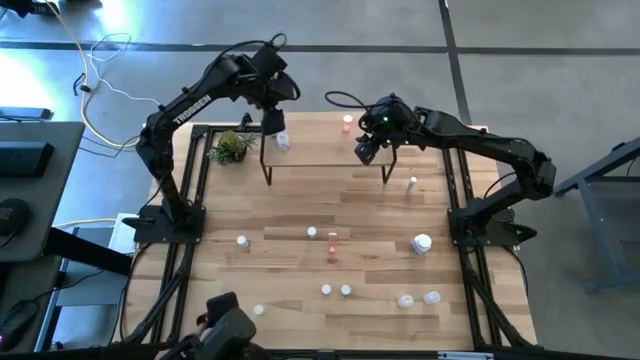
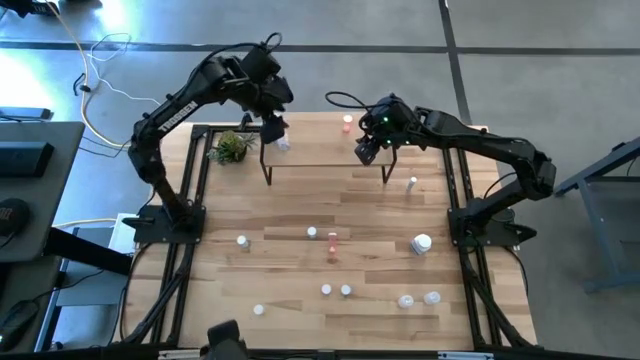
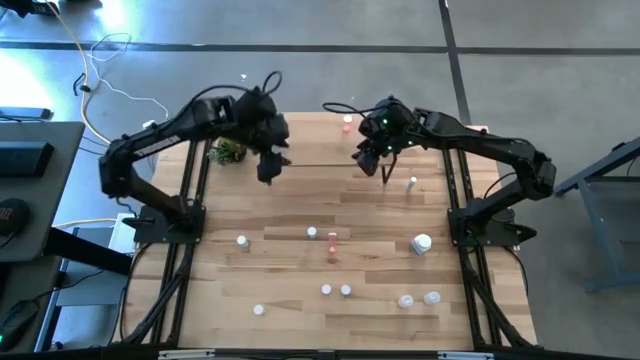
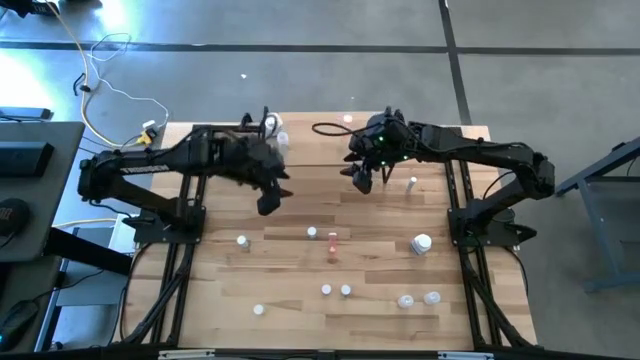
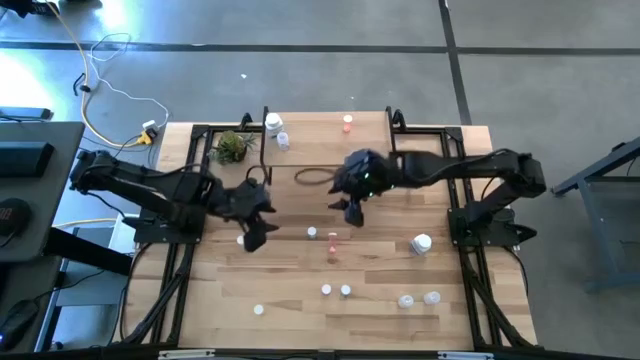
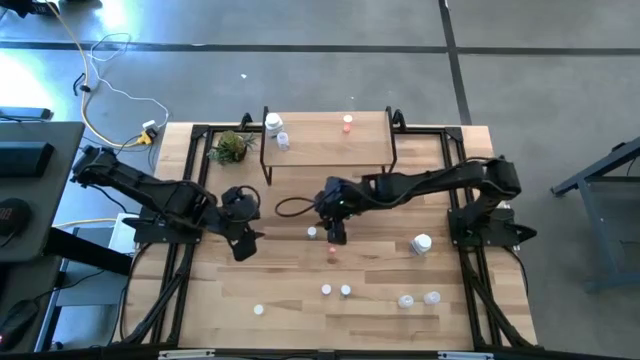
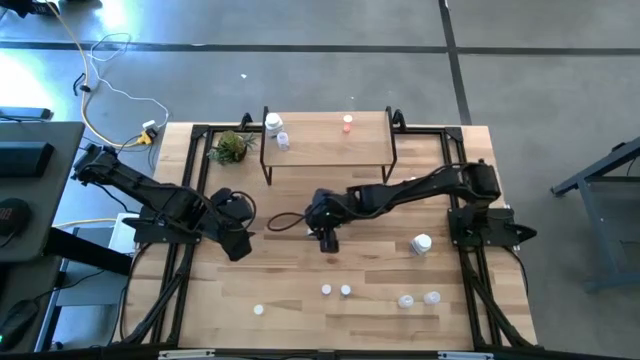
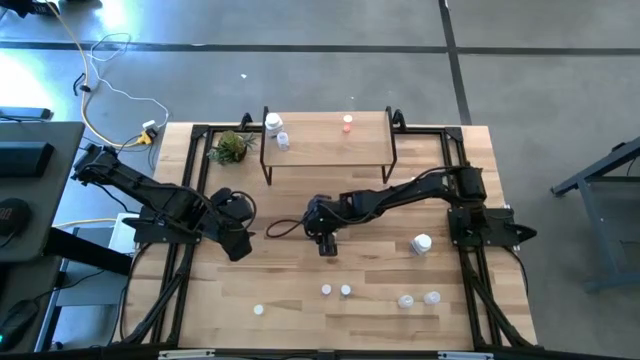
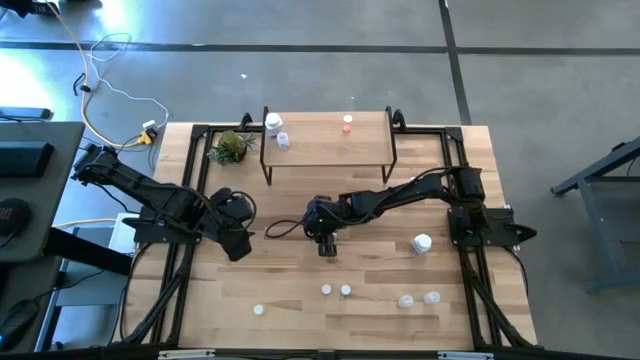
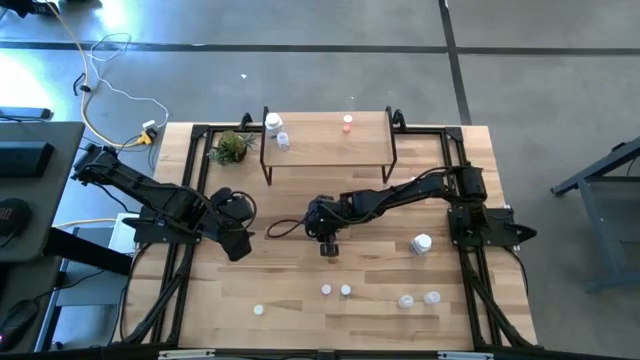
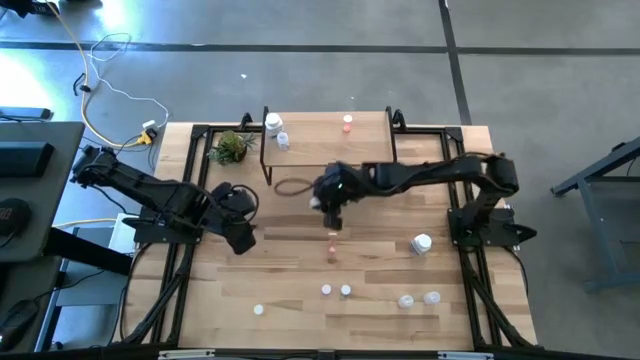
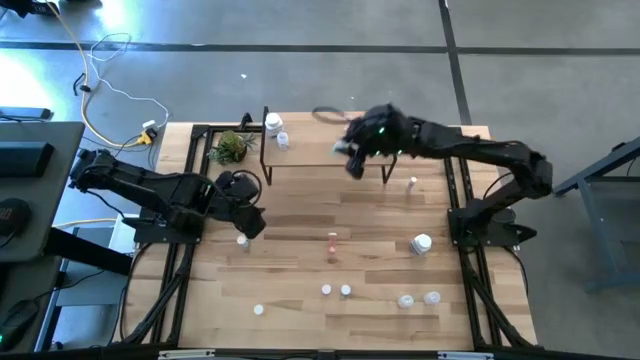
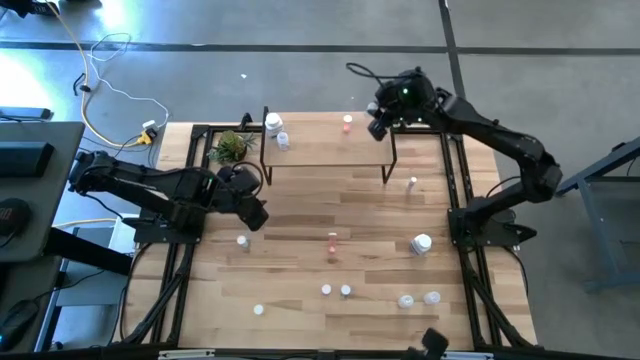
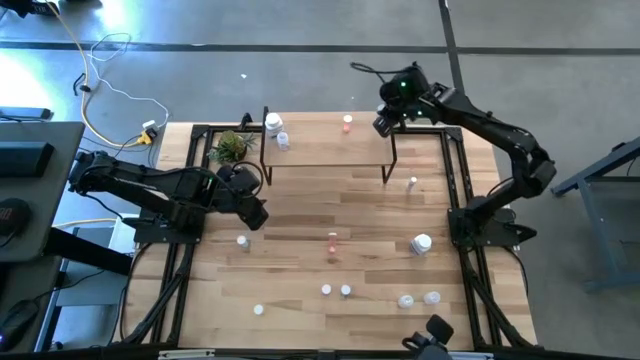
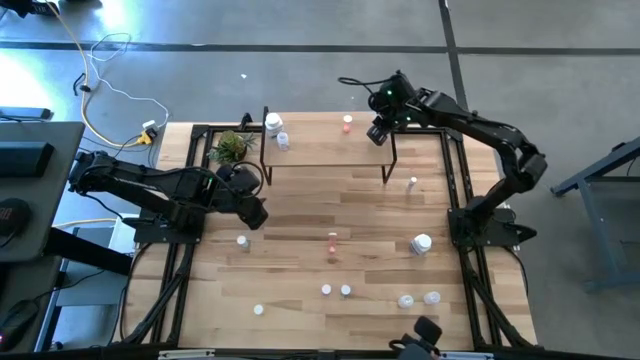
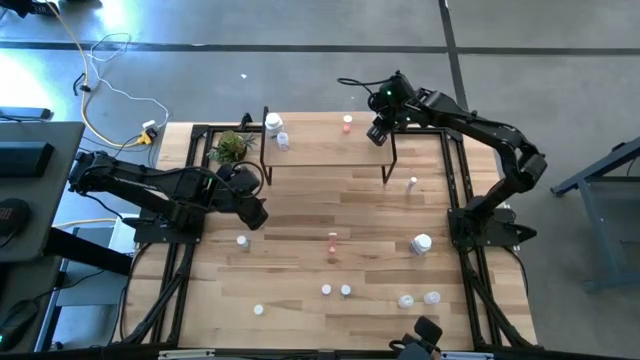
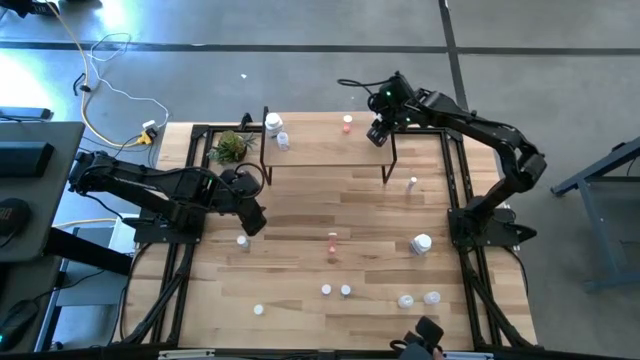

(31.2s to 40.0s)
Task: Pick and place medicine bottles onto shelf by color
Put the top right blue pill bottle on the shelf

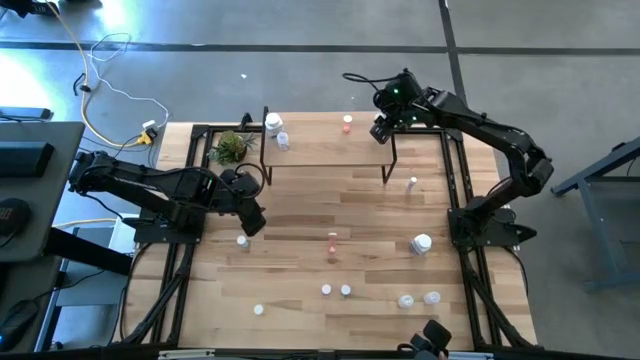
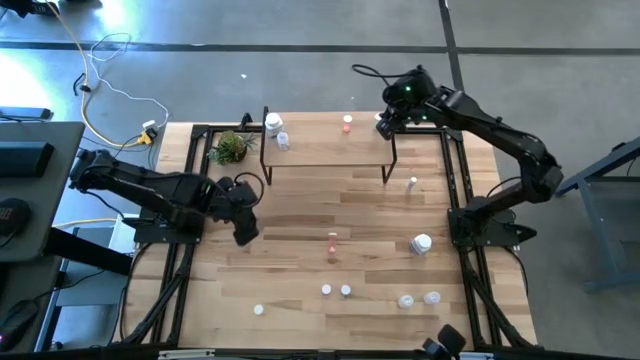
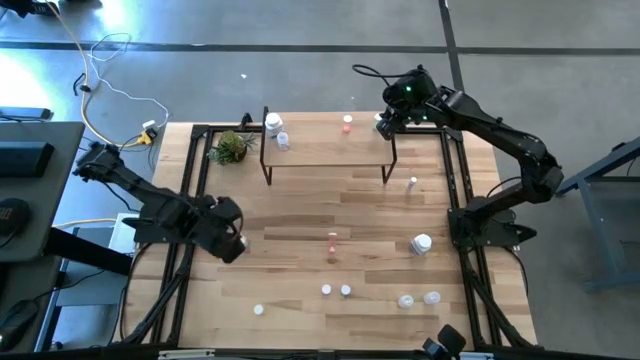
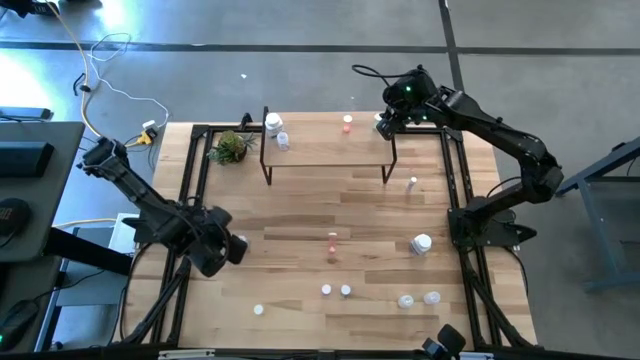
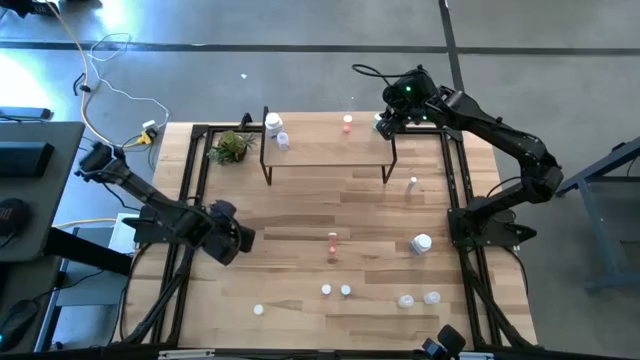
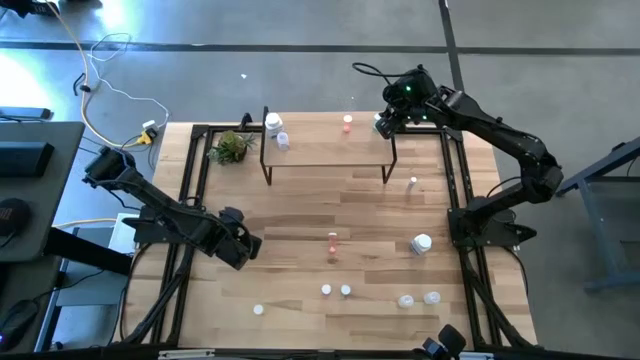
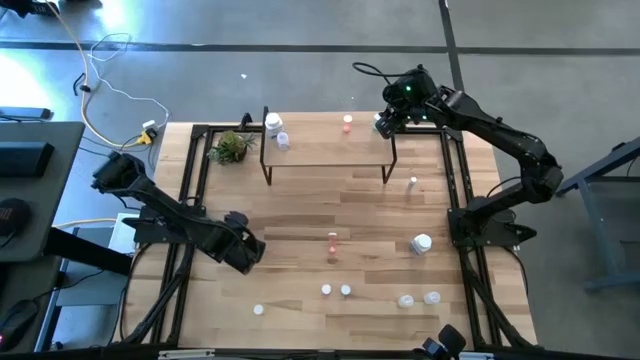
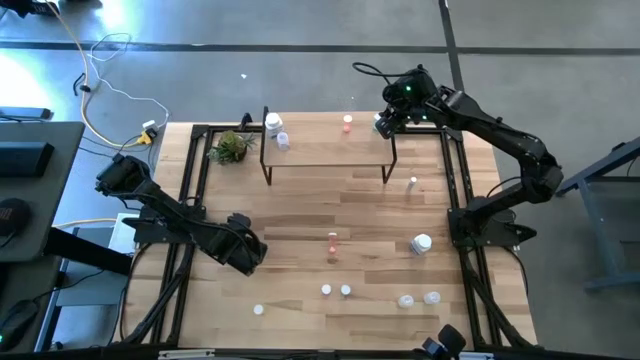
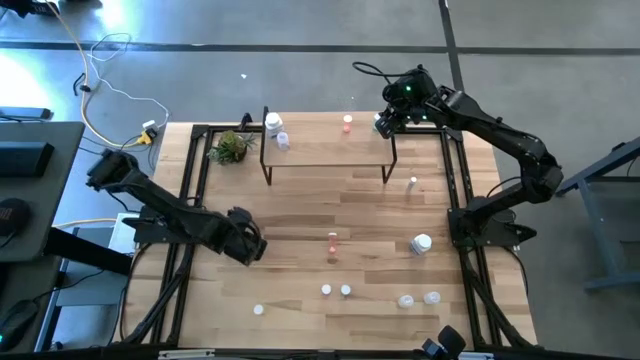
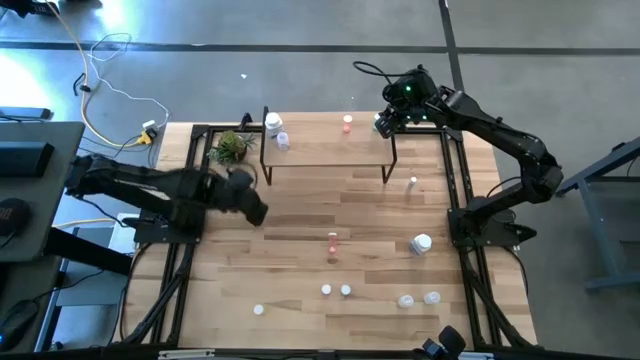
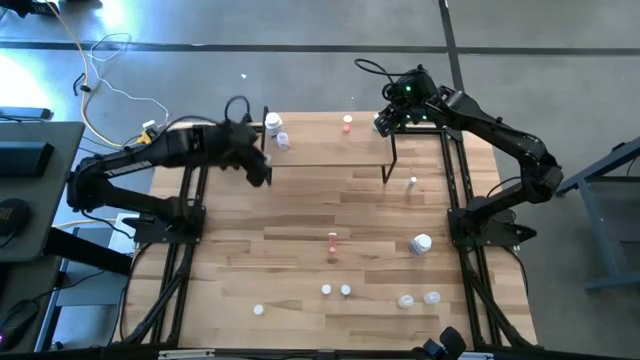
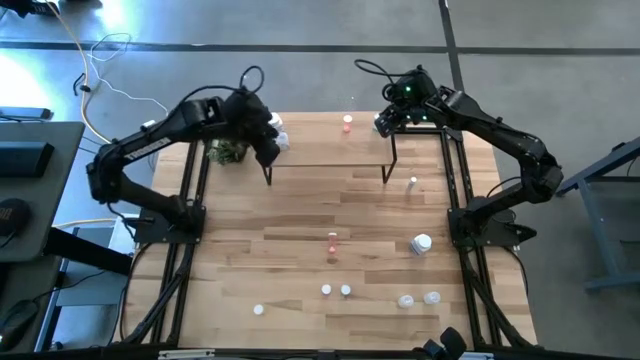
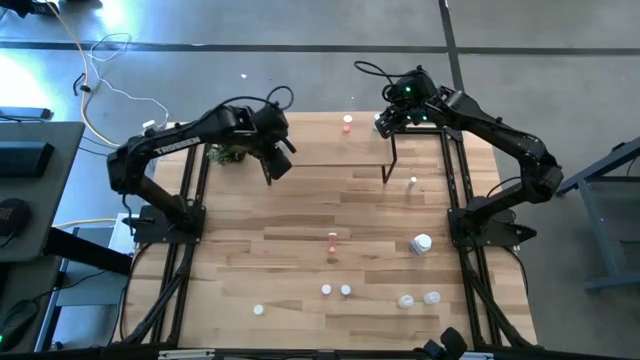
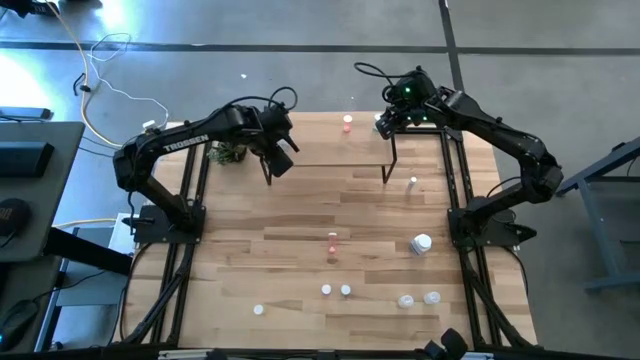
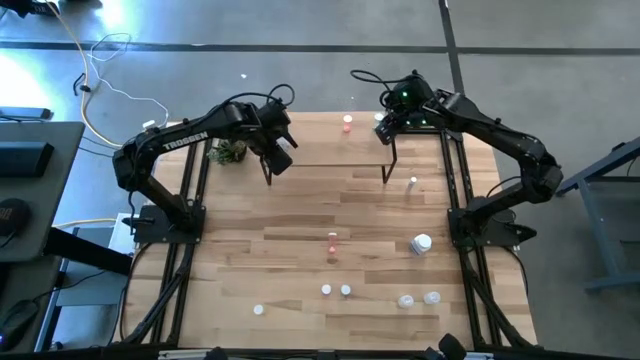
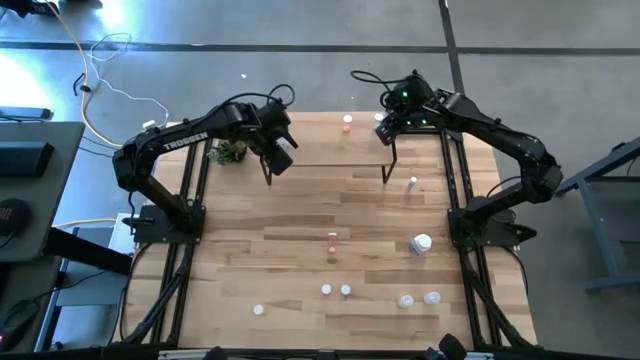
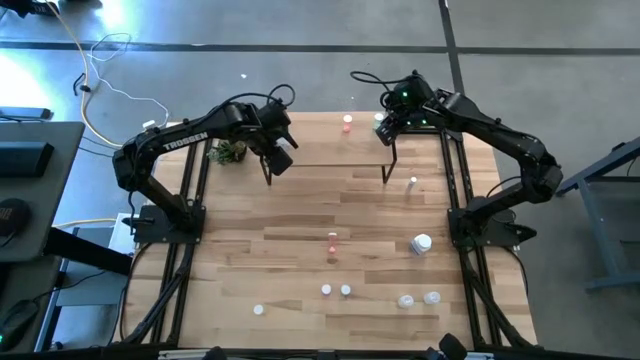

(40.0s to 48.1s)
Put the left blue pill bottle on the shelf

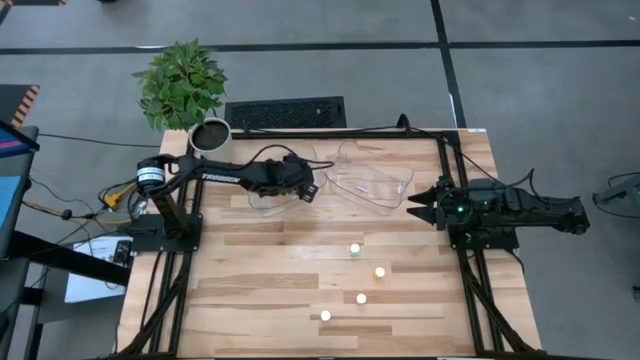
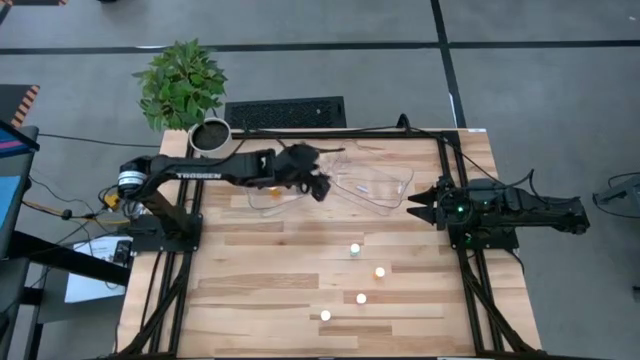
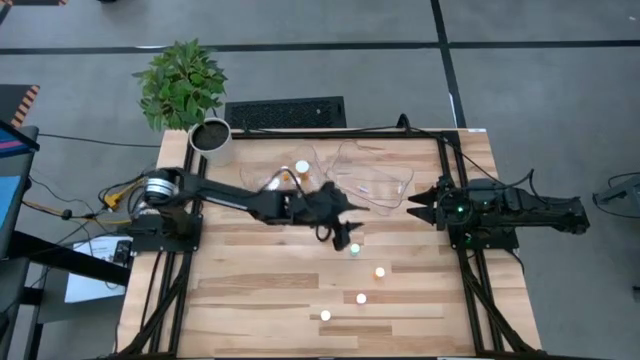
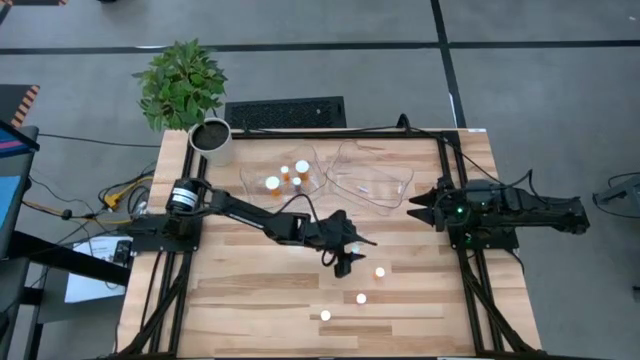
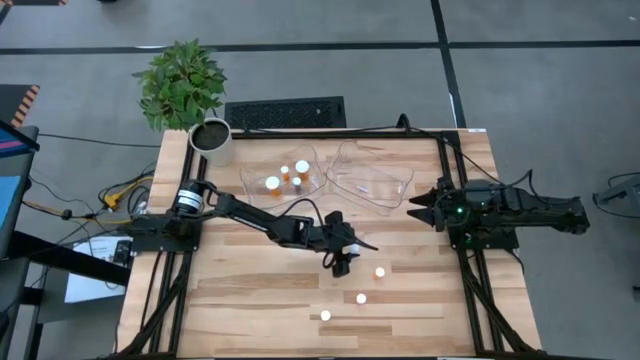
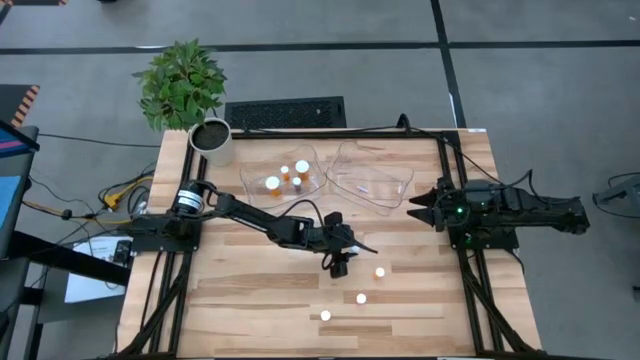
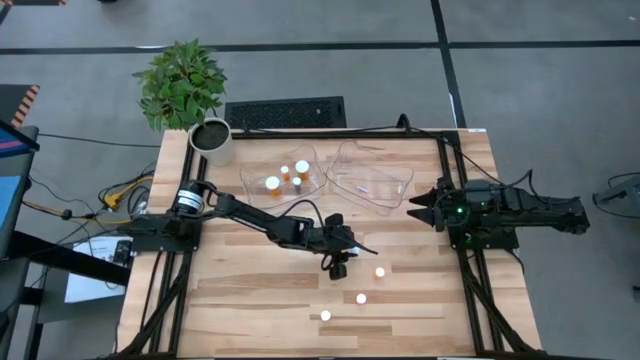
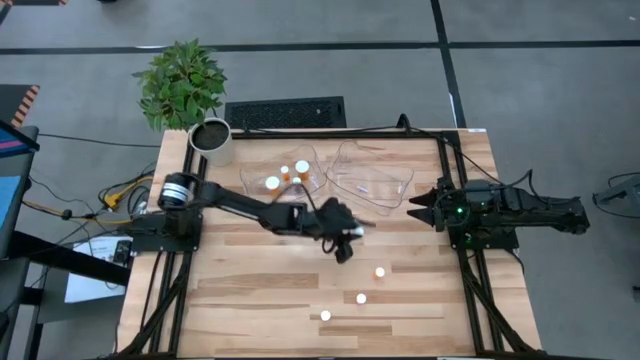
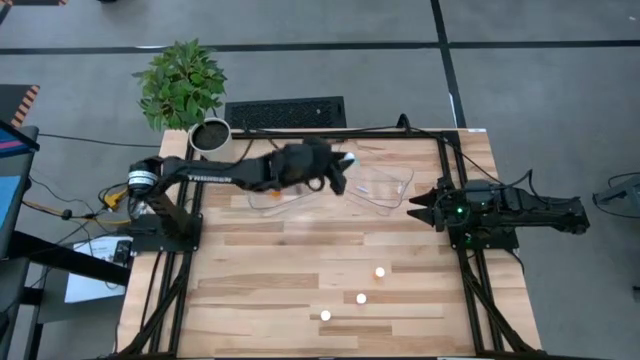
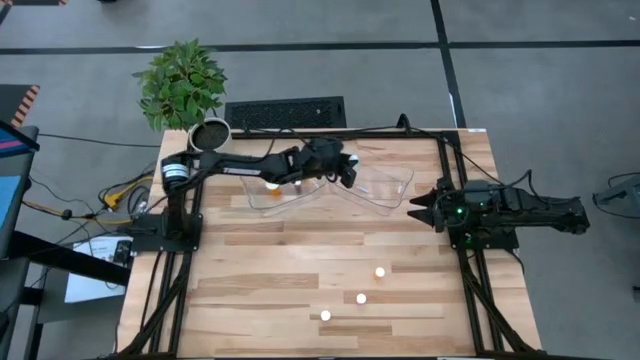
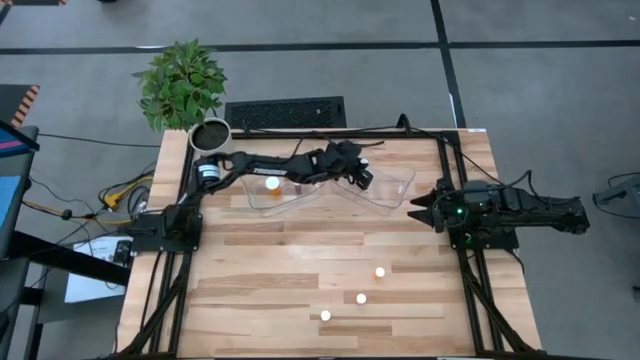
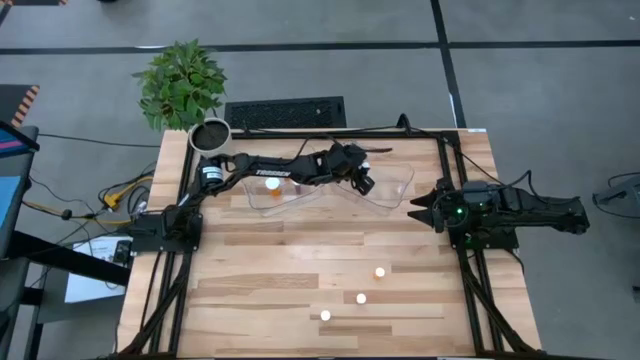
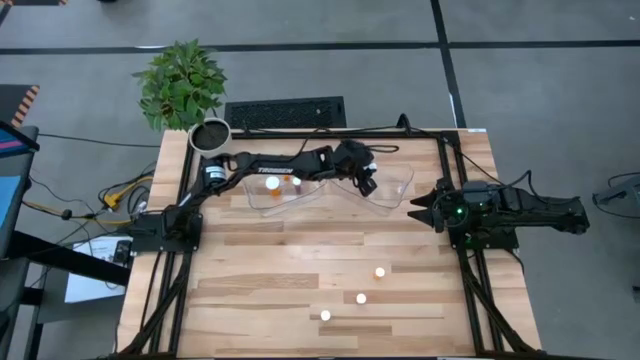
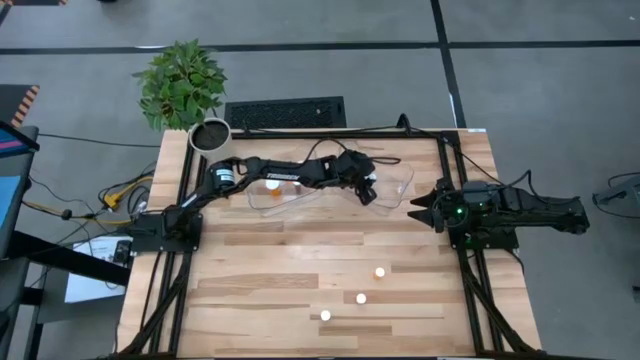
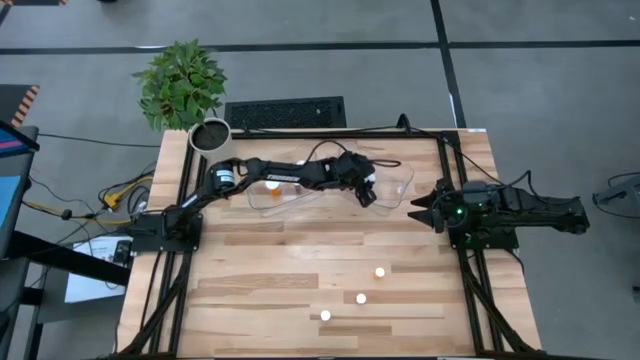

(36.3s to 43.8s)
Task: Pick and place medicine bottles into bin by pill shape (circle, oval)
Put the green tablet bottle into the right transparent bin
